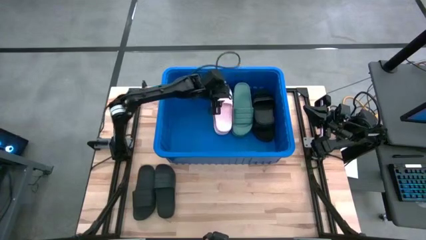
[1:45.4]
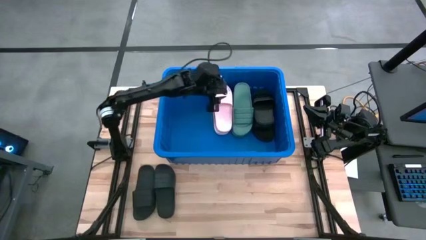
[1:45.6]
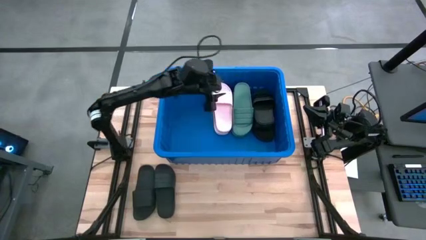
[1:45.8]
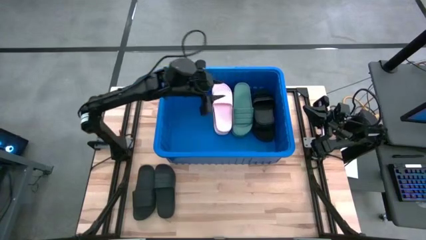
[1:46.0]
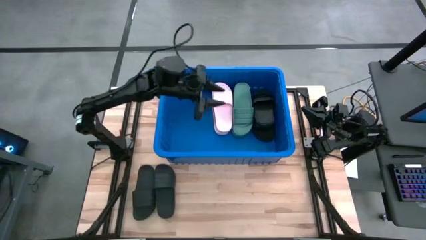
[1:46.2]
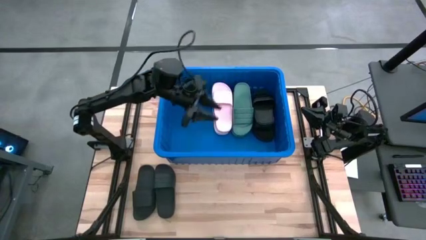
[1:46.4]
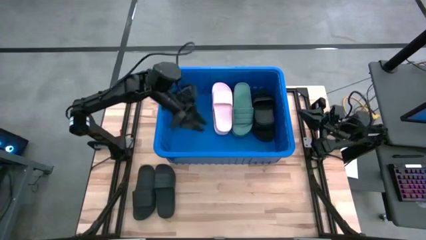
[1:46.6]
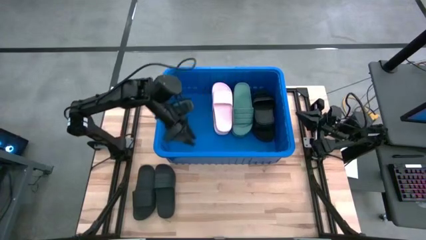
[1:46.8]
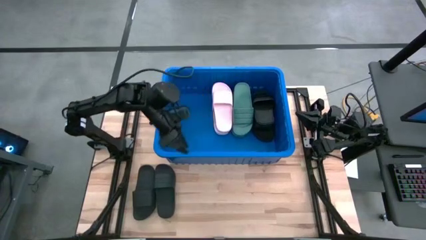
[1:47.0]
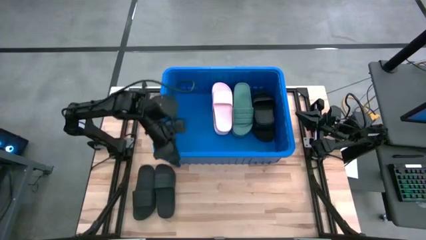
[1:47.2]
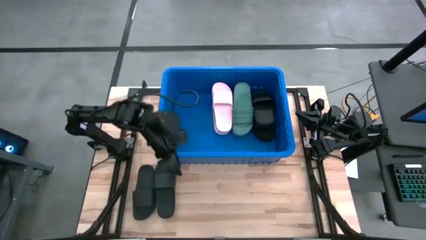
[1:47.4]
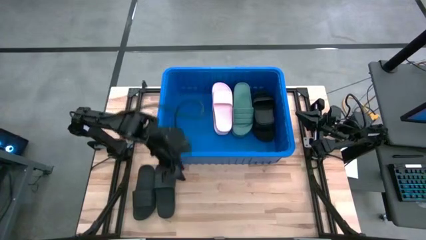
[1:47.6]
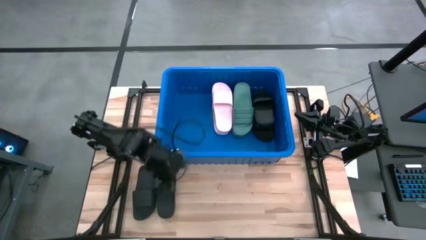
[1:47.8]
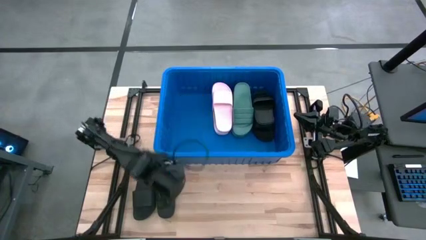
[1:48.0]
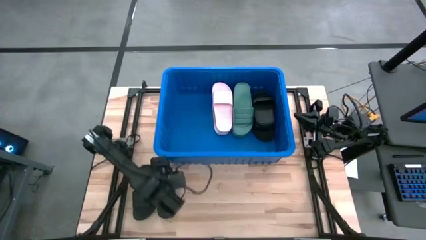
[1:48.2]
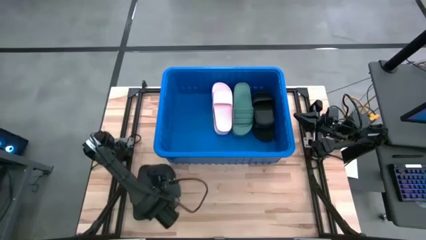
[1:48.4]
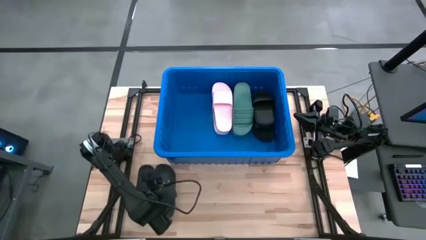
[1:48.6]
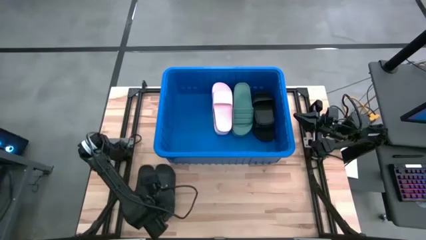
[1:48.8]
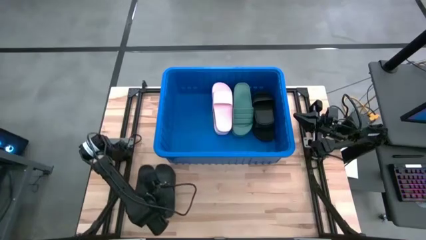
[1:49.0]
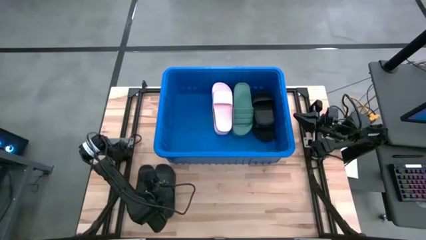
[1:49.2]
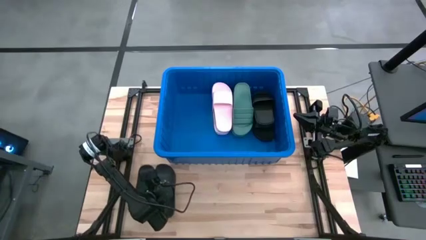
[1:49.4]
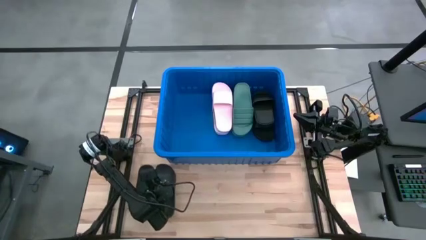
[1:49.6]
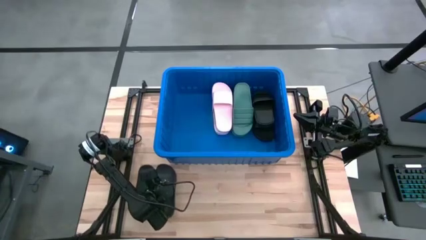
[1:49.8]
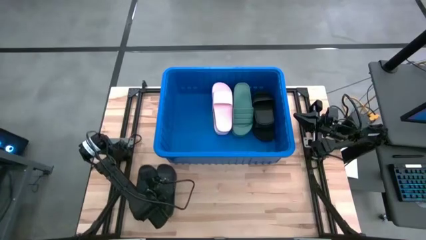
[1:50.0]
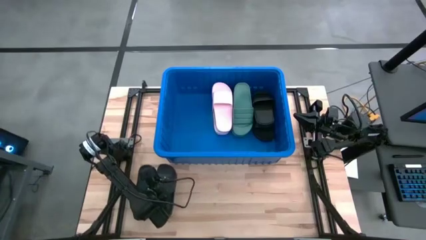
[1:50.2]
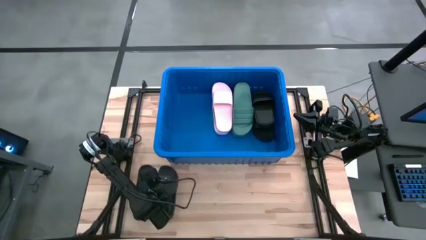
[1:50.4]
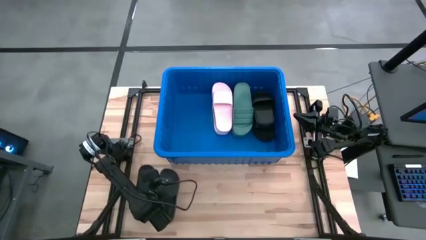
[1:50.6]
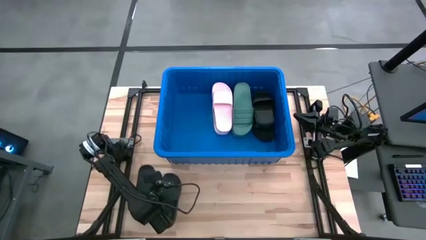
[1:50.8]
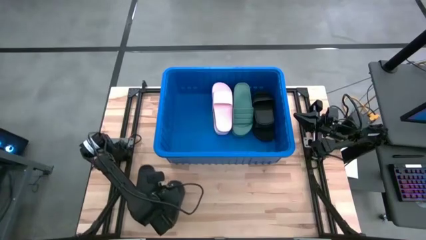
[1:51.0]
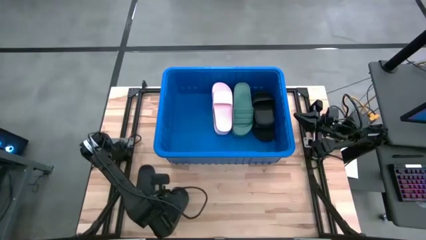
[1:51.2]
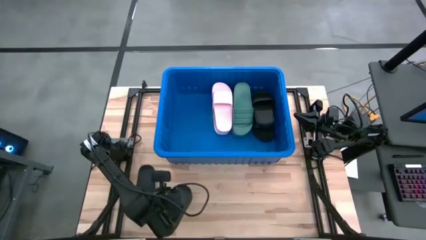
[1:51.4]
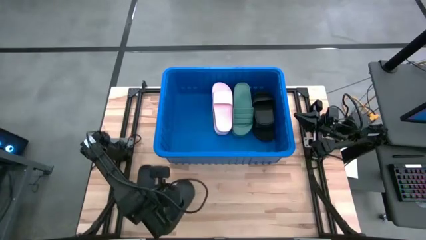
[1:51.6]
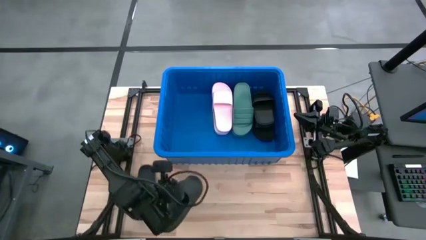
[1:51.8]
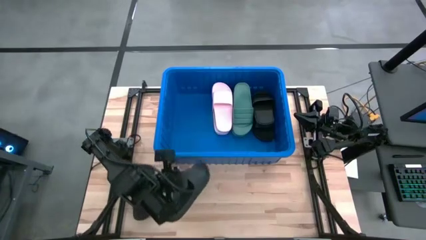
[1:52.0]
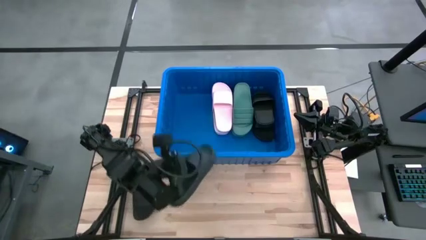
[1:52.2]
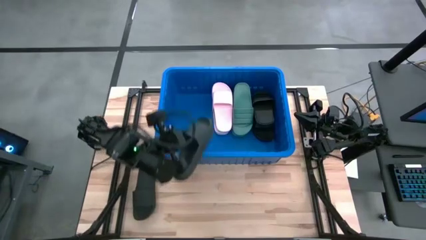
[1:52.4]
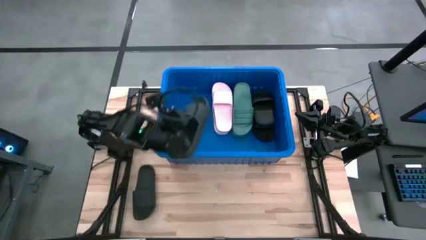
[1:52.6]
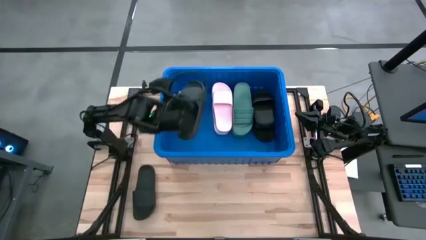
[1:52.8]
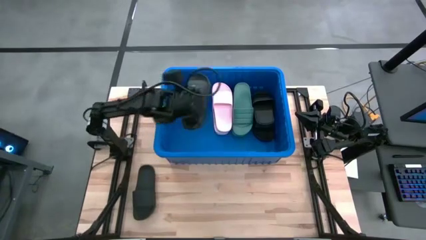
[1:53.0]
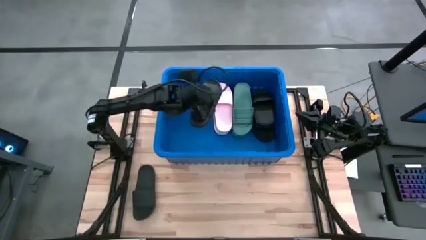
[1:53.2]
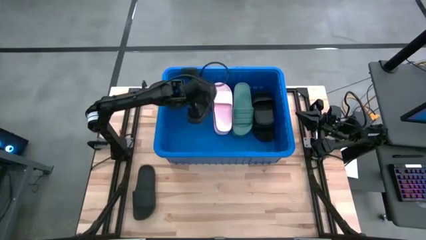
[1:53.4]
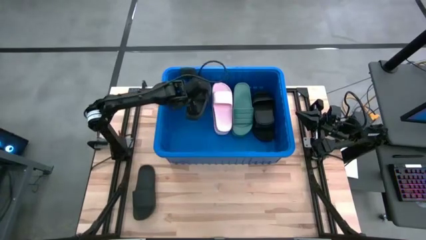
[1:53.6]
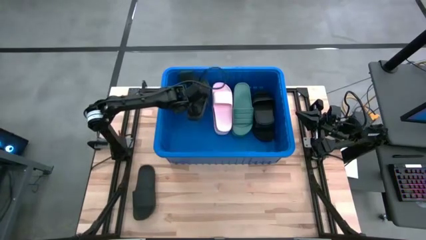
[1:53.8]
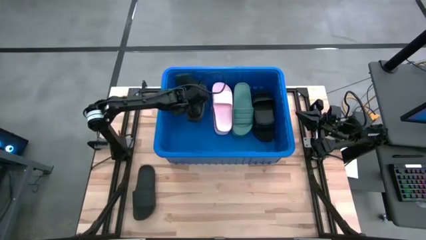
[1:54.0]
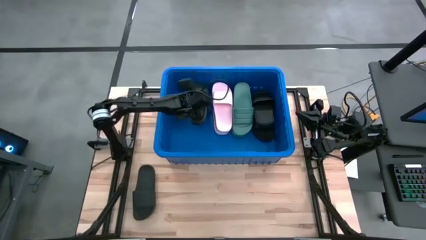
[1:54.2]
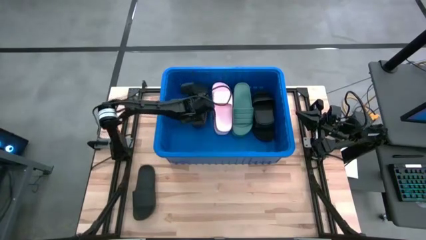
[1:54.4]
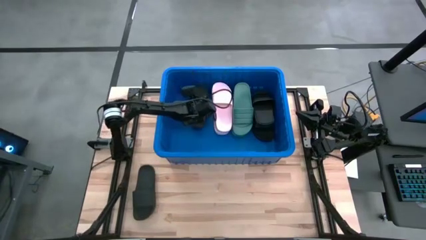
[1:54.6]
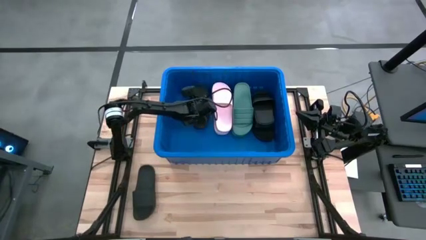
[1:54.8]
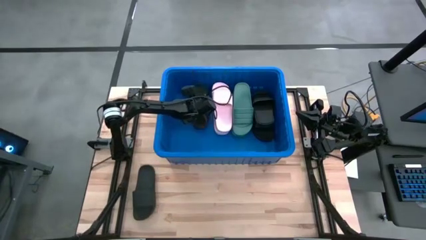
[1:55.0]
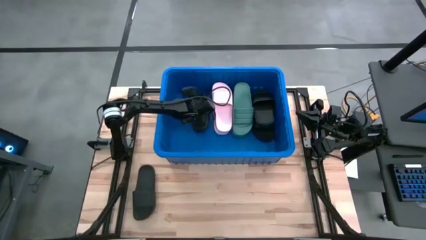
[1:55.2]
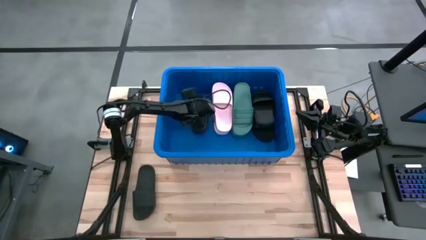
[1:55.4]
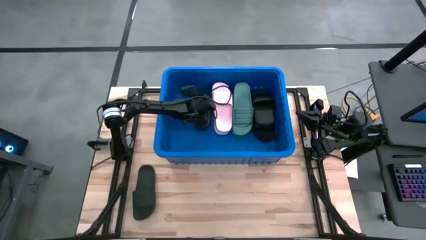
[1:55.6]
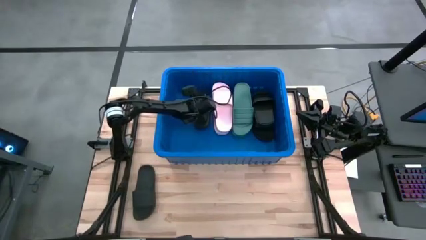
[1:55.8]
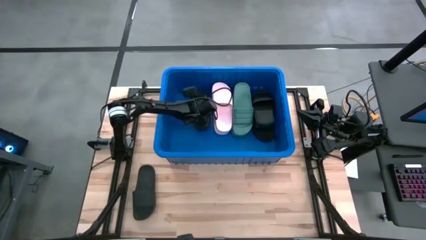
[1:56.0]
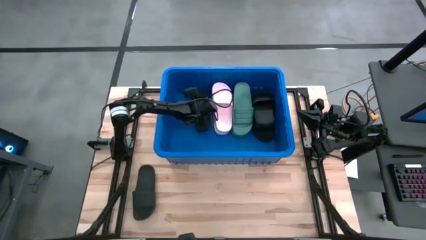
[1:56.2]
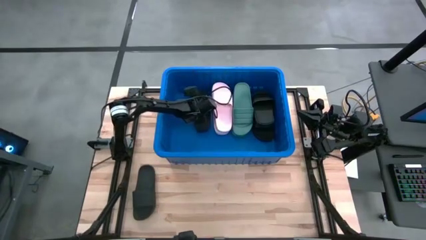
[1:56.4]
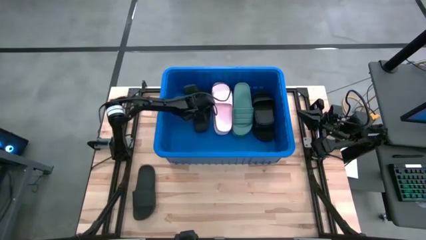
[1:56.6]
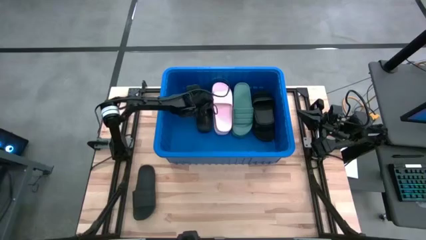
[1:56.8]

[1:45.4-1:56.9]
Task: Pick and place slides into bin
Put the black slide into the bin
